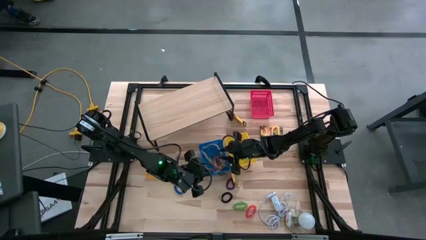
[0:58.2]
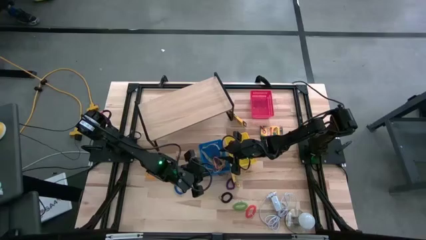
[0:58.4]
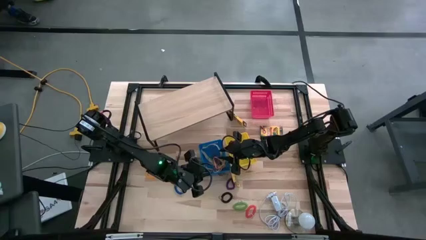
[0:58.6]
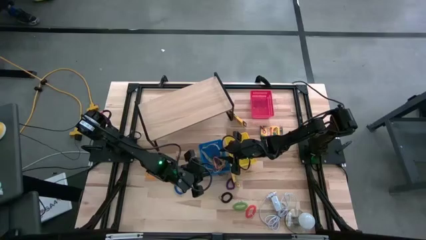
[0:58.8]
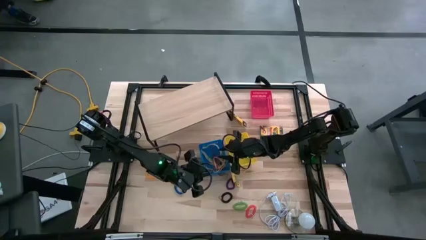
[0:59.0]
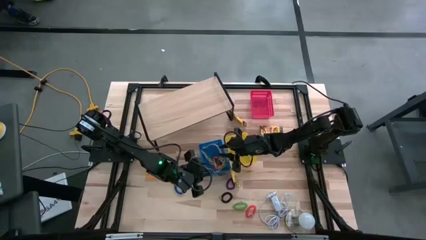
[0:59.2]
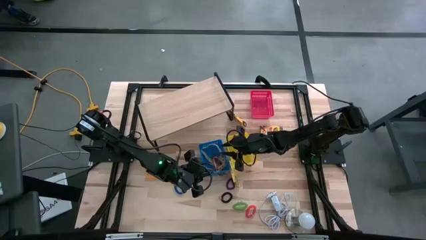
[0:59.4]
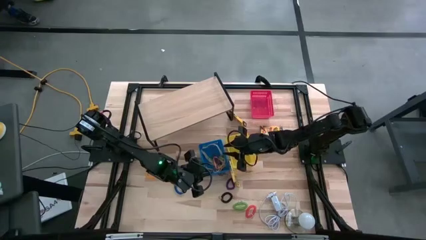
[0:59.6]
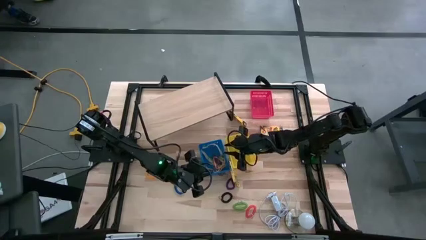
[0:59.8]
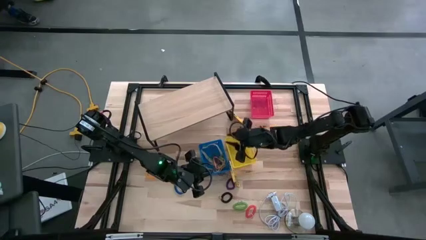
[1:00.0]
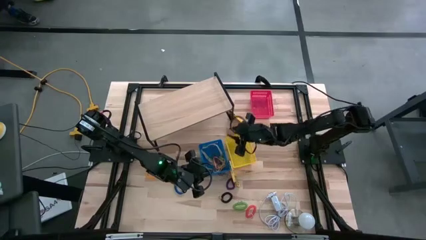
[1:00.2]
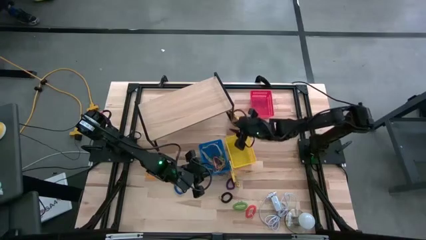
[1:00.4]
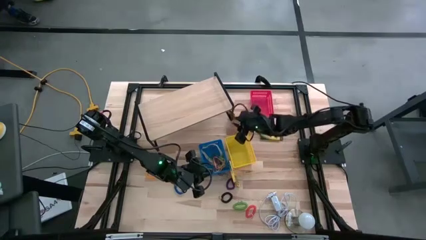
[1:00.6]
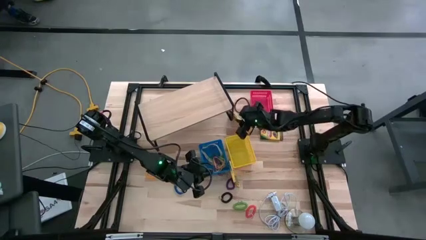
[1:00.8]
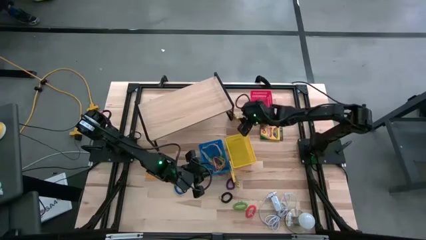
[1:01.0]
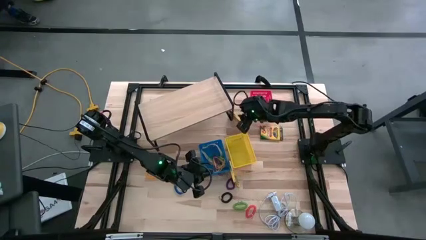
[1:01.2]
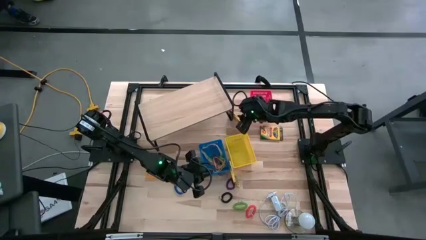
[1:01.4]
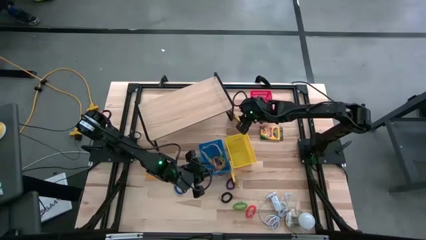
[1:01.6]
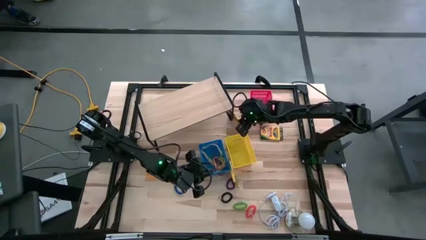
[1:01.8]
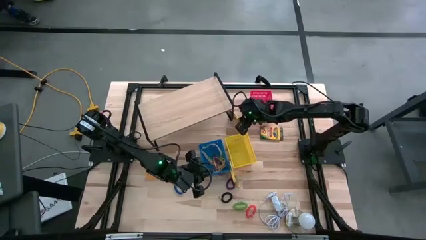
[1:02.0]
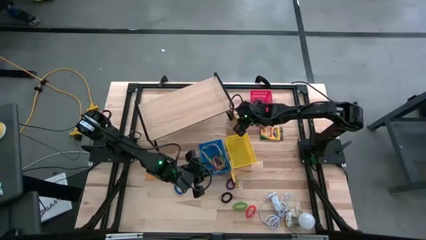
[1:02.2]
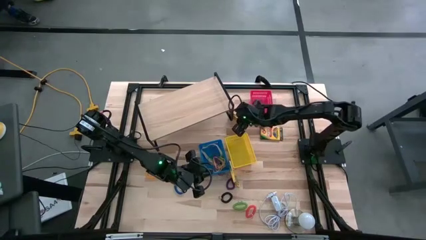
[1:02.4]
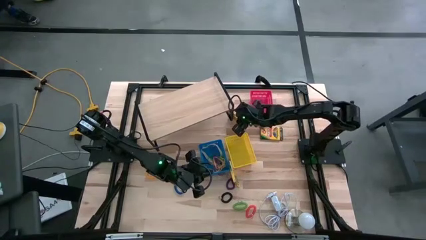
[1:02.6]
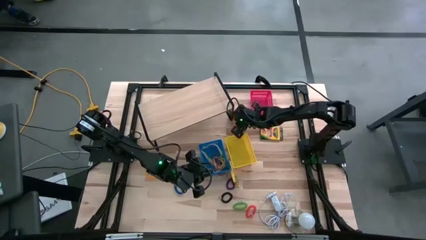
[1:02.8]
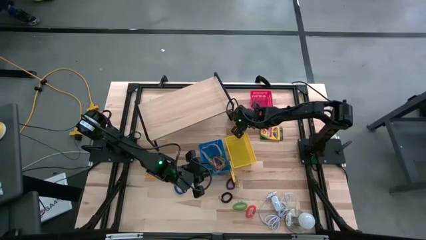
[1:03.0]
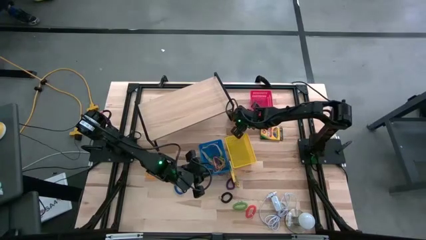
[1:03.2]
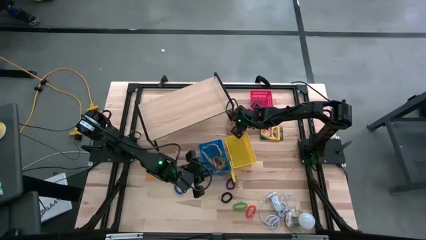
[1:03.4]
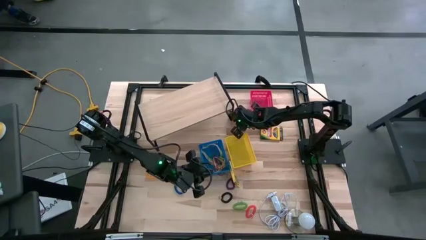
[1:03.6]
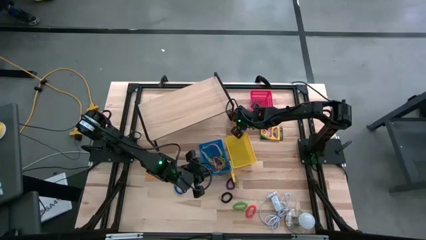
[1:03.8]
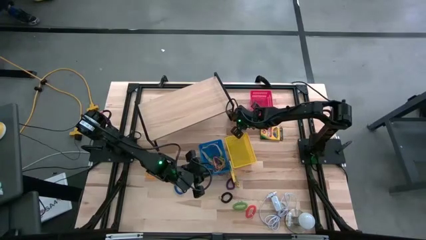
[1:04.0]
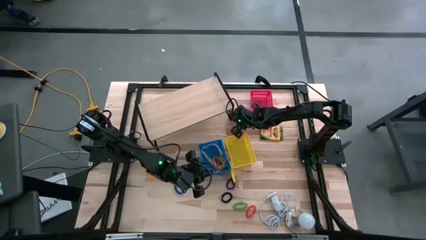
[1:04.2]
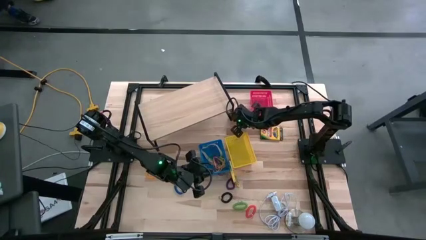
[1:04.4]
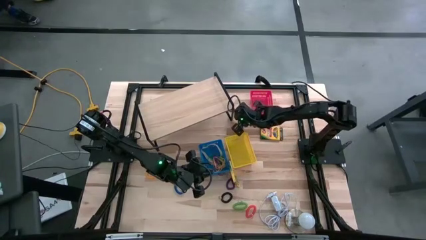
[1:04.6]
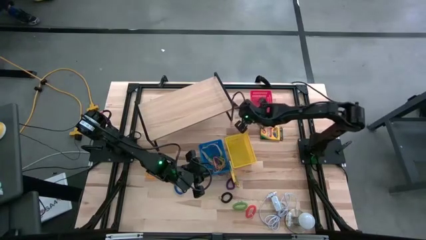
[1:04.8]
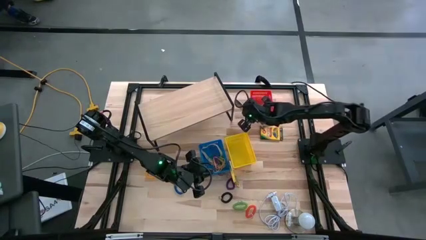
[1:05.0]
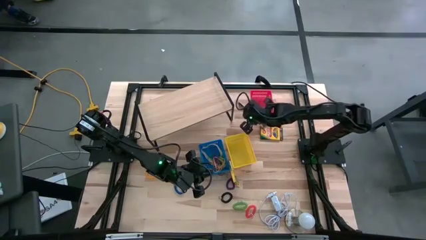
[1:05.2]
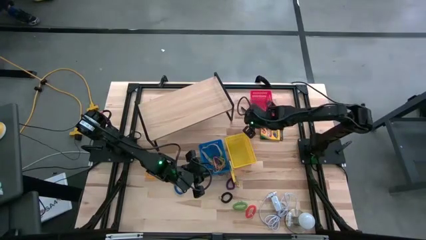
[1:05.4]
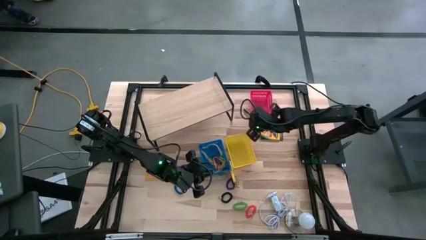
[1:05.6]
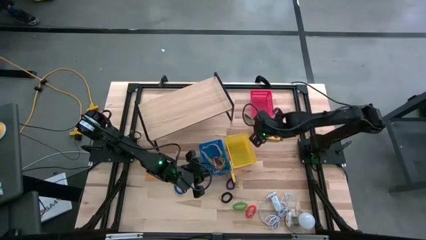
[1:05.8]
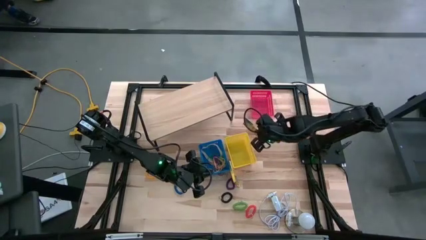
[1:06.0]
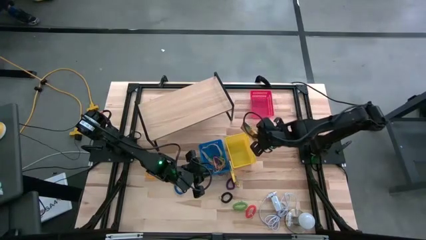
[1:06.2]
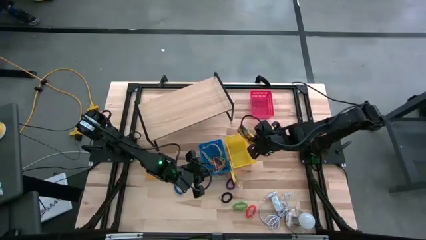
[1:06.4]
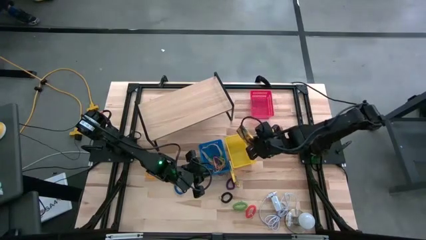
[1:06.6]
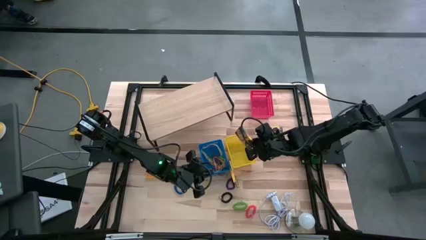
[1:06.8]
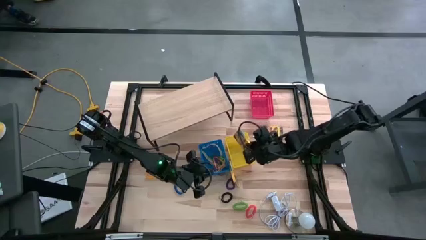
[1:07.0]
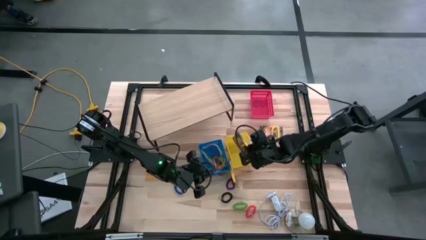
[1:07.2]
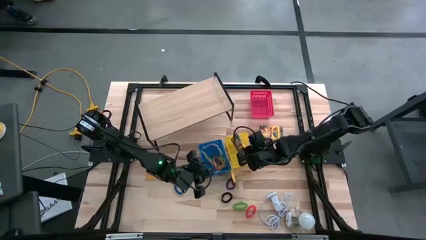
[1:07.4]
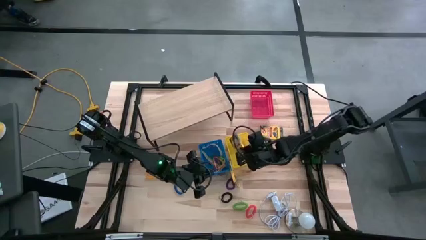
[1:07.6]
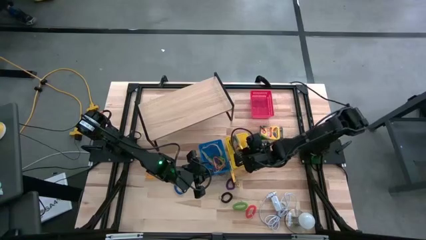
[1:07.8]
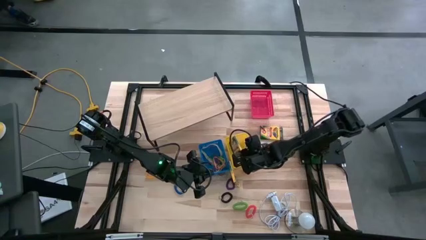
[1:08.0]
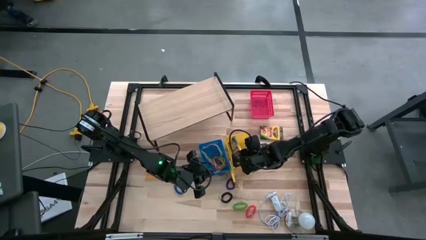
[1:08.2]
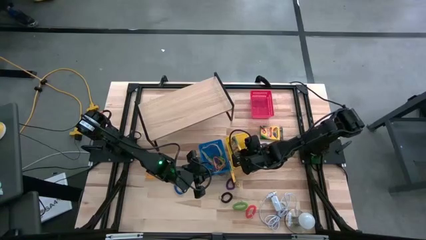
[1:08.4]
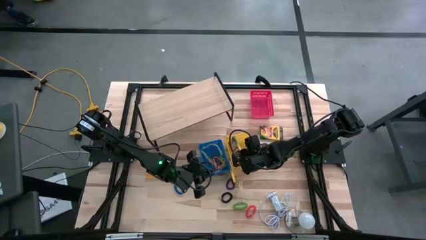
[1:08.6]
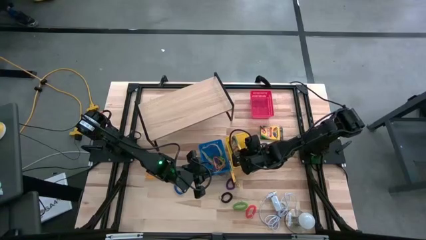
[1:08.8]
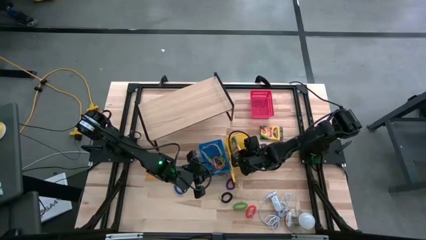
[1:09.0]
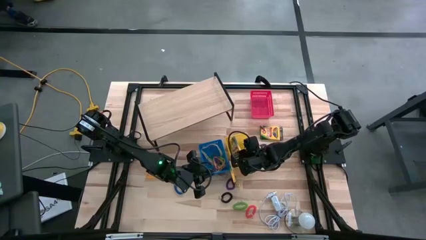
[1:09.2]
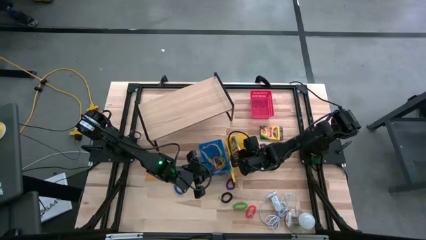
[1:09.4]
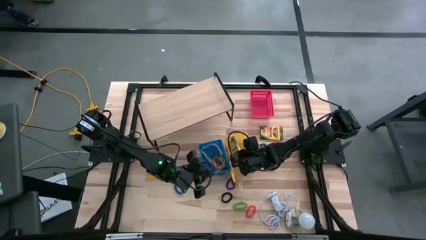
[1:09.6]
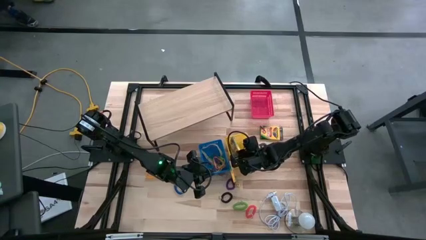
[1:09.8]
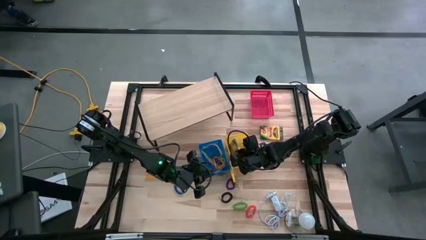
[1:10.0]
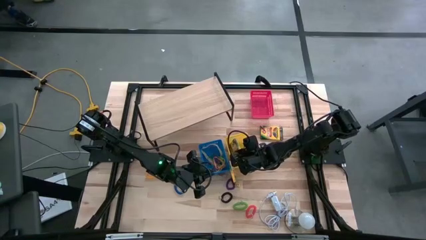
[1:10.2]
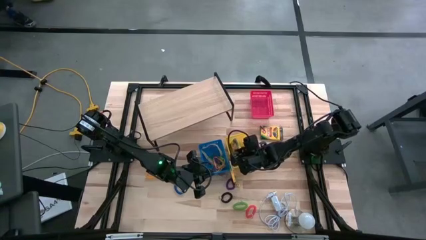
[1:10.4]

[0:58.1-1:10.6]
Task: Pick & Place Office Desk Supplies
Put the top left yellow crayon box into the yellow bin
